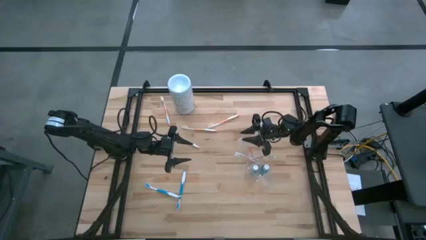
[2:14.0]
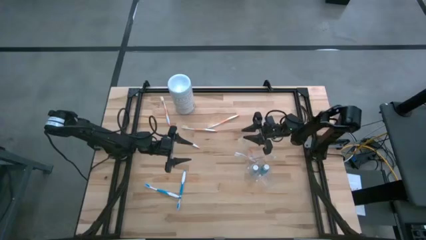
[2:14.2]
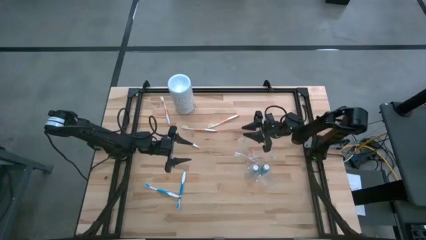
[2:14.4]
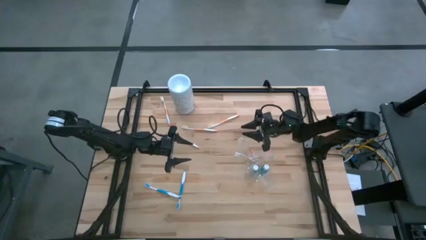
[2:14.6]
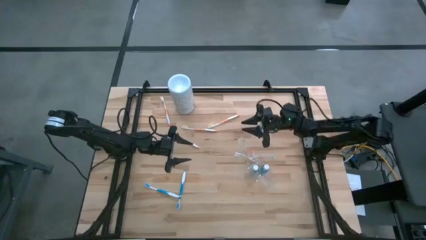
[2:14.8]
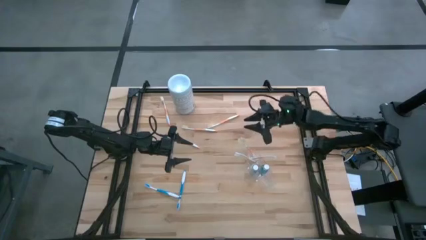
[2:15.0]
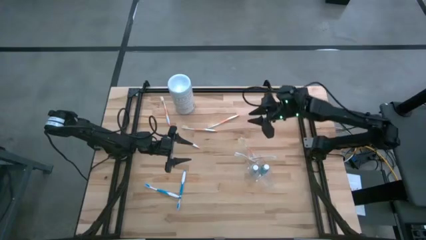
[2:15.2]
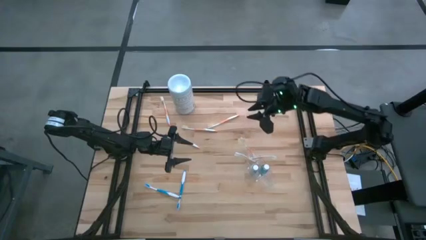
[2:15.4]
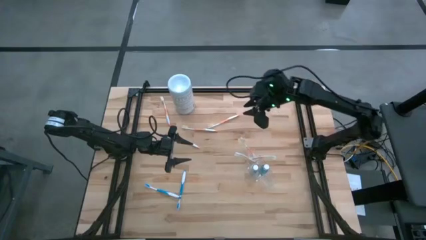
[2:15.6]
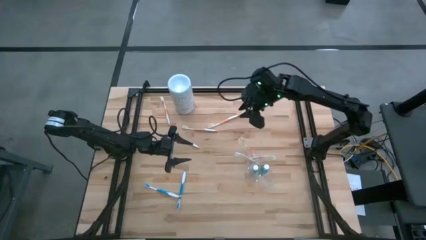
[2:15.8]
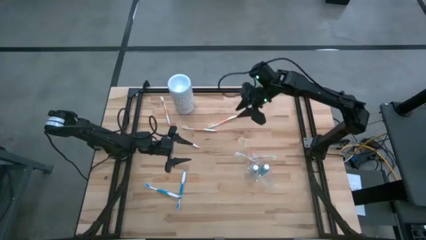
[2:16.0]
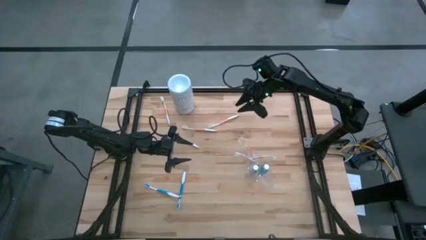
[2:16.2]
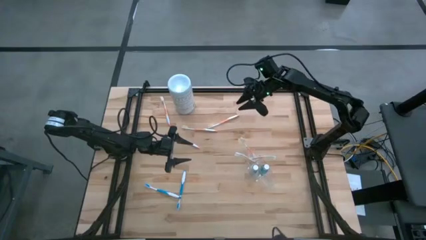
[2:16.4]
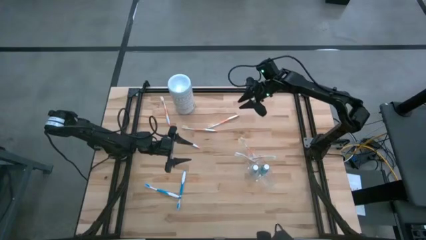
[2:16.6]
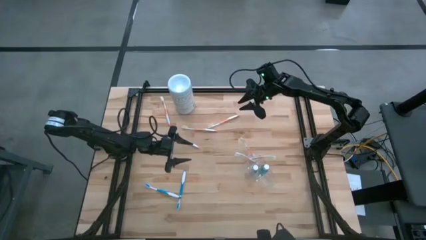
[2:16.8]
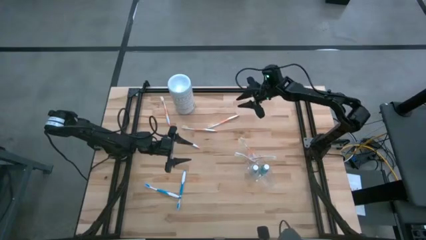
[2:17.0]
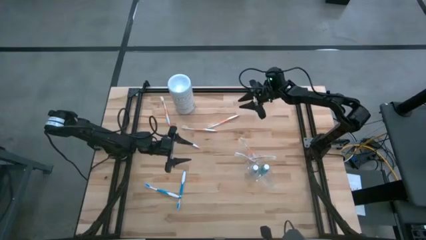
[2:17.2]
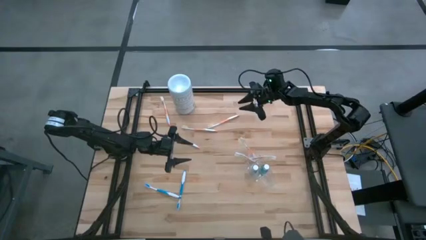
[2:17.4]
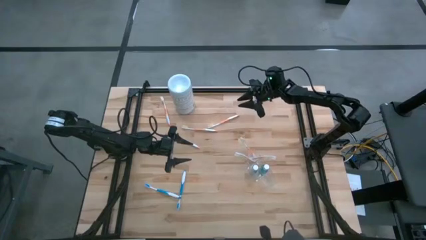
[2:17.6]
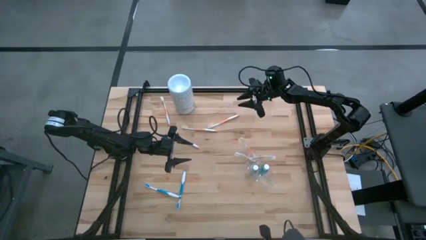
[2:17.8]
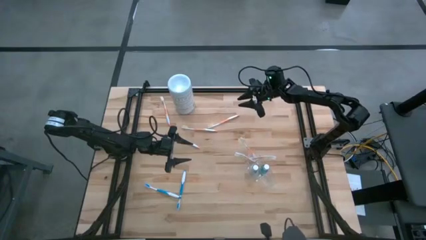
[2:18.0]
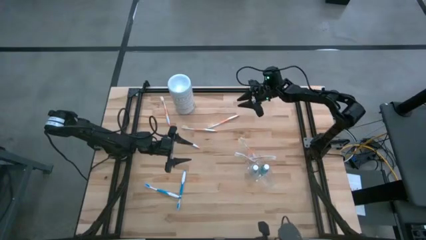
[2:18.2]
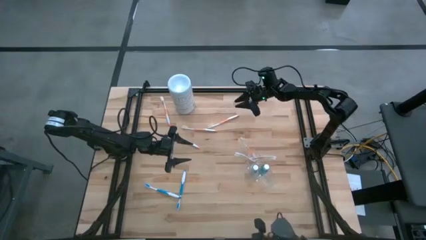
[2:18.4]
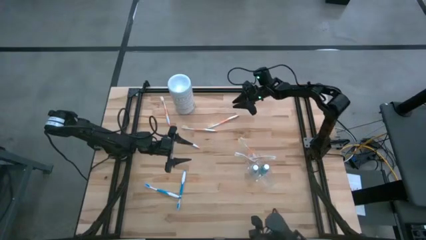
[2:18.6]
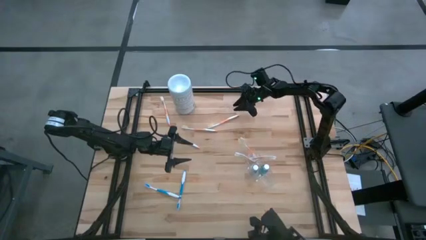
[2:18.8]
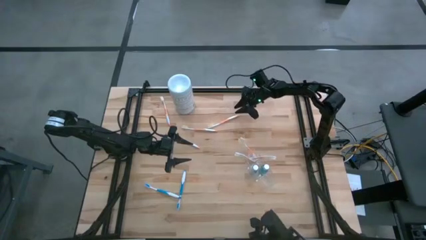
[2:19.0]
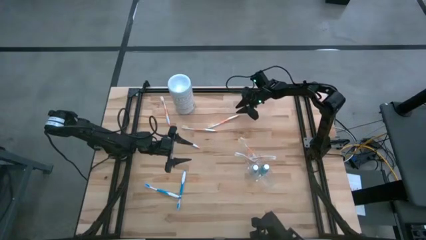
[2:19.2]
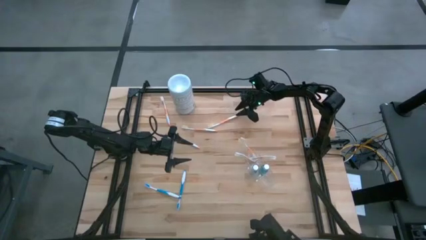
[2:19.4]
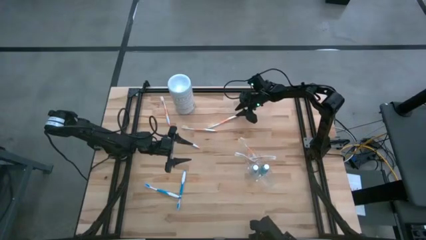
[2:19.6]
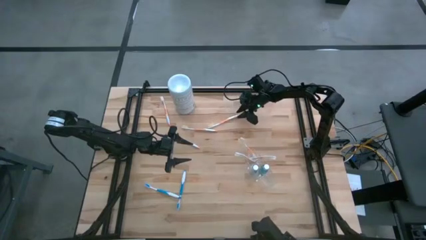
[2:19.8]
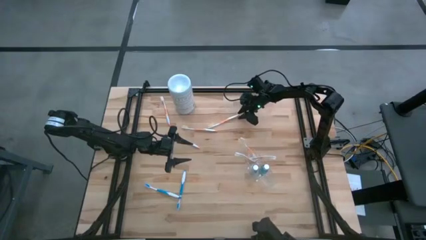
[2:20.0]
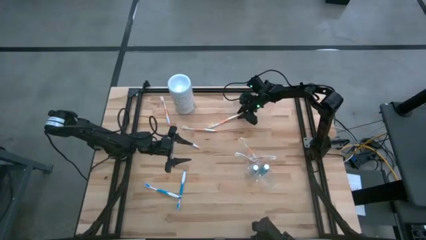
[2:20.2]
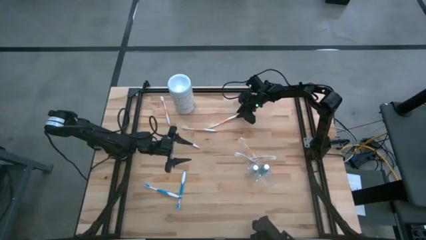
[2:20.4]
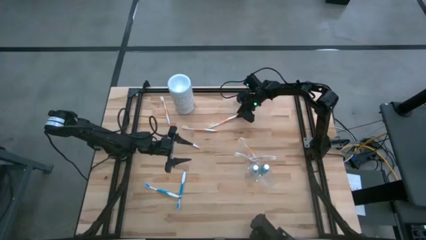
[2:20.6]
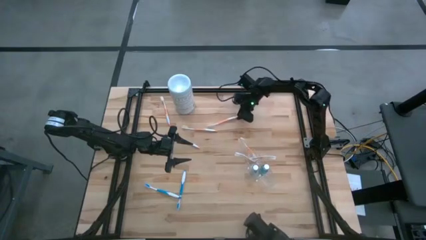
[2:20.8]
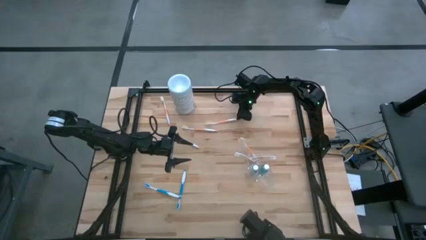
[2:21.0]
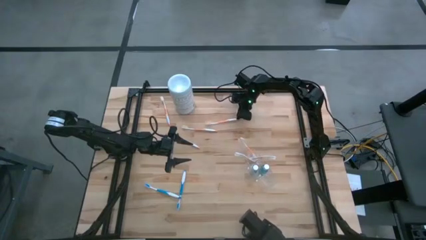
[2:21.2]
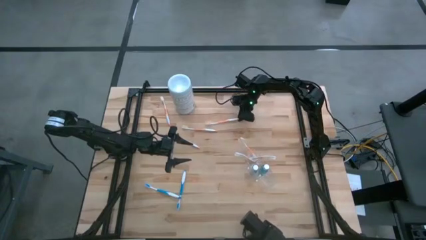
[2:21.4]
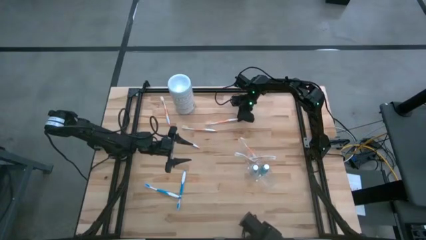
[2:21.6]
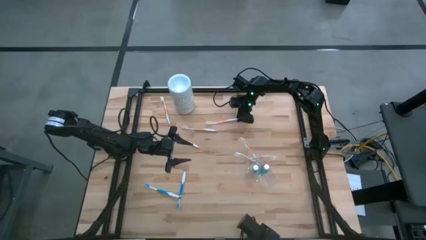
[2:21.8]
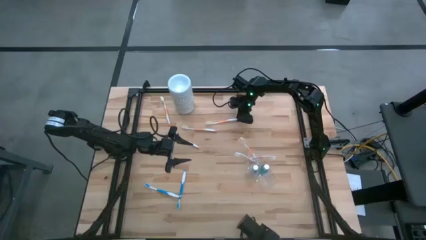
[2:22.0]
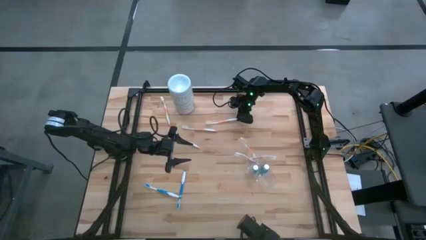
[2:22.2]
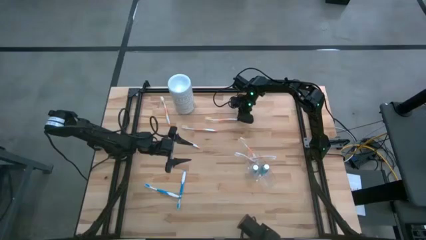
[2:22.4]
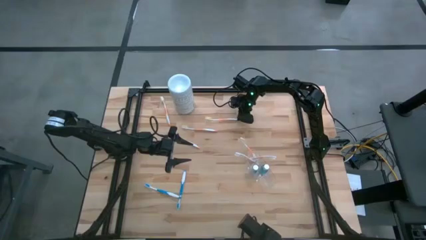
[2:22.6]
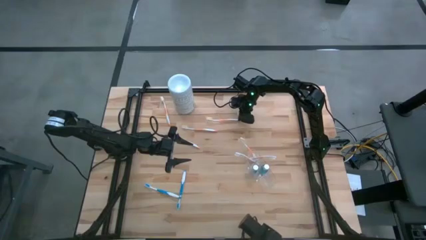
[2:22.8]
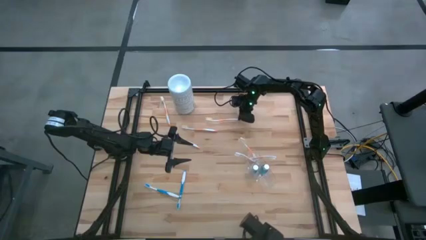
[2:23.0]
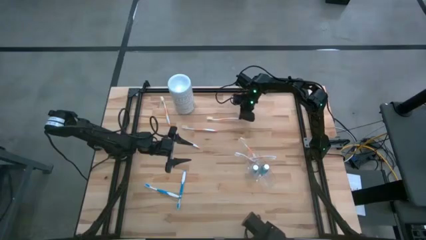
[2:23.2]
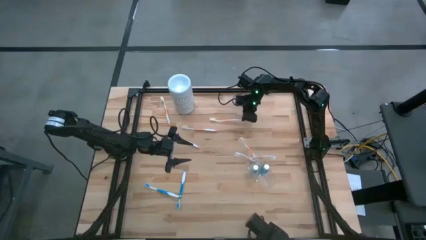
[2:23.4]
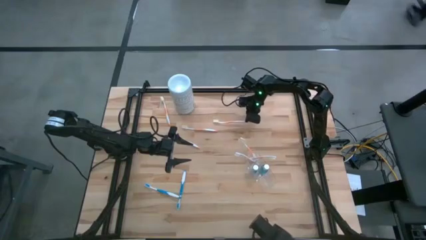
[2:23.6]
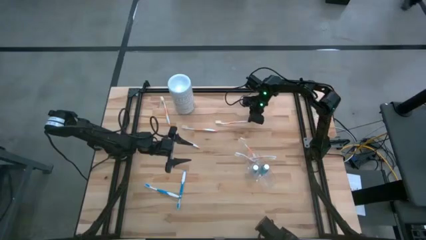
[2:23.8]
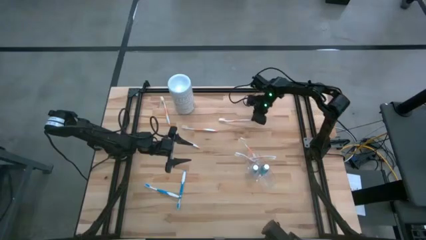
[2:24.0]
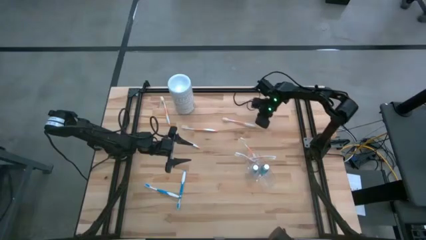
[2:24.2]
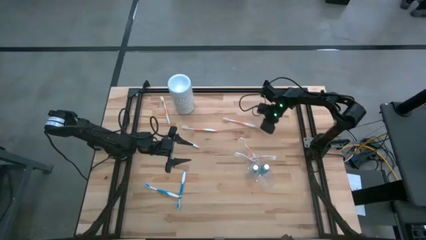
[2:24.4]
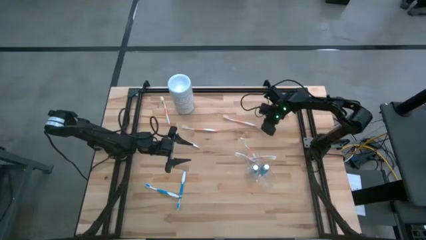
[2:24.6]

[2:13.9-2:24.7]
Task: Pick & Place toothbrushing station
Put the orange toothbrush into the top section of the transparent organizer

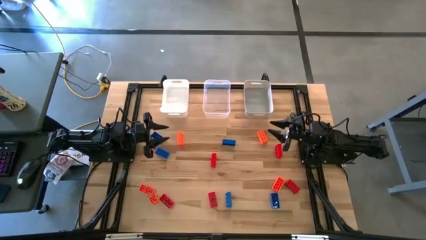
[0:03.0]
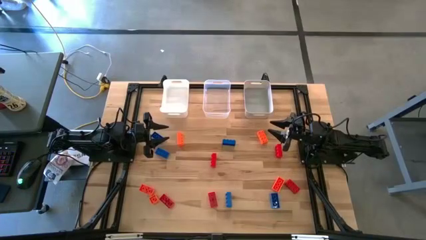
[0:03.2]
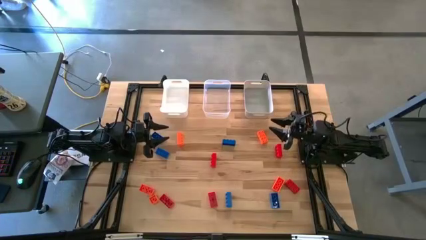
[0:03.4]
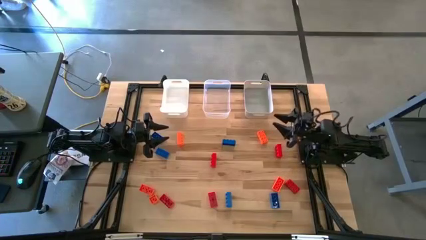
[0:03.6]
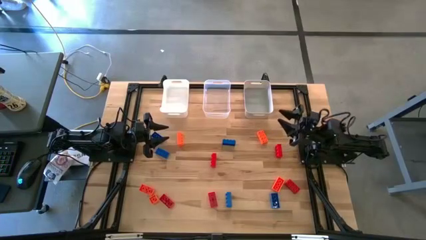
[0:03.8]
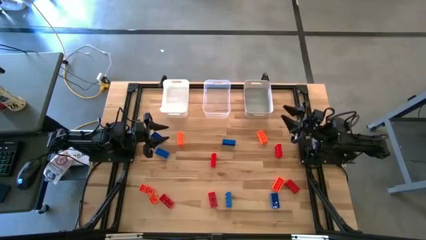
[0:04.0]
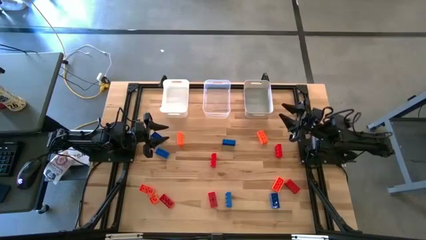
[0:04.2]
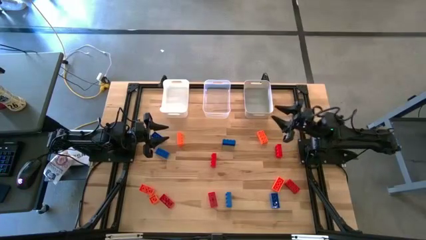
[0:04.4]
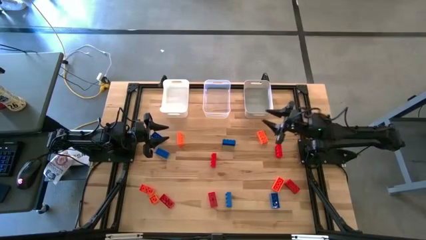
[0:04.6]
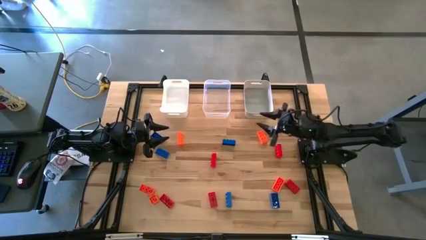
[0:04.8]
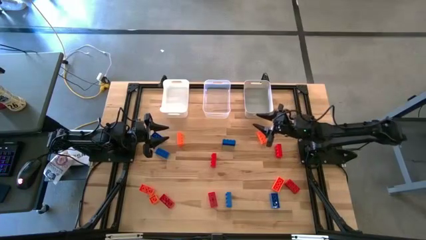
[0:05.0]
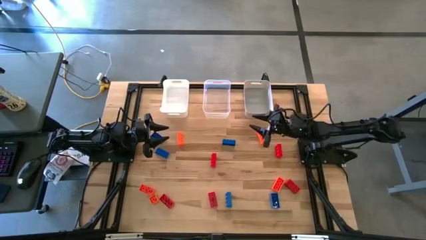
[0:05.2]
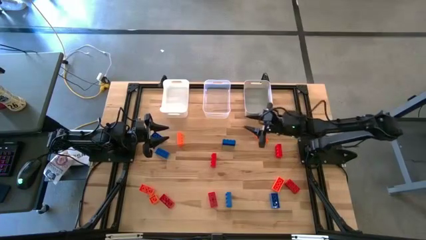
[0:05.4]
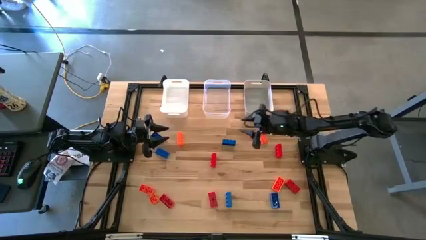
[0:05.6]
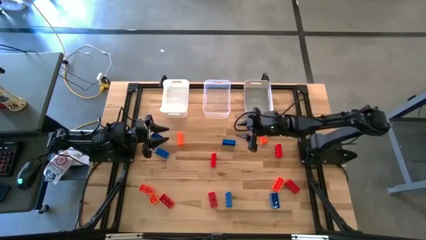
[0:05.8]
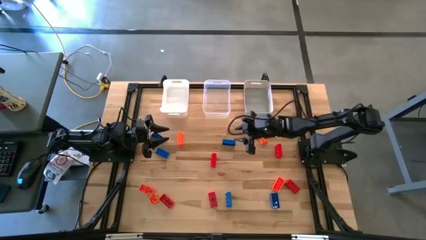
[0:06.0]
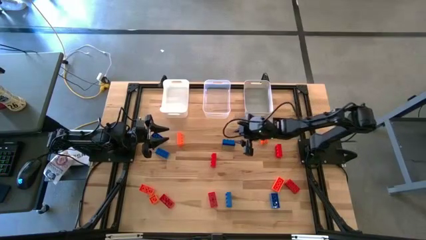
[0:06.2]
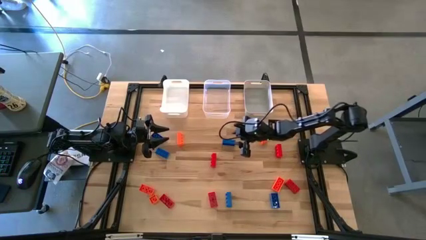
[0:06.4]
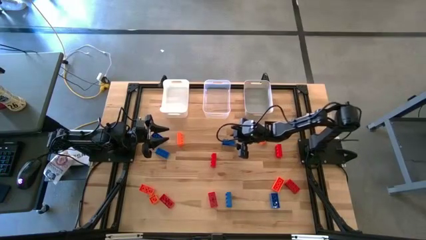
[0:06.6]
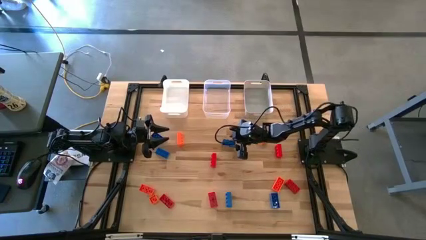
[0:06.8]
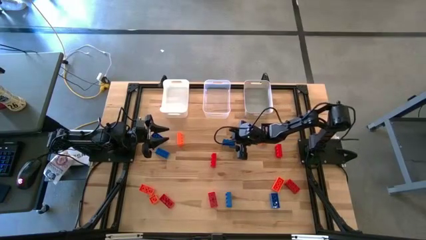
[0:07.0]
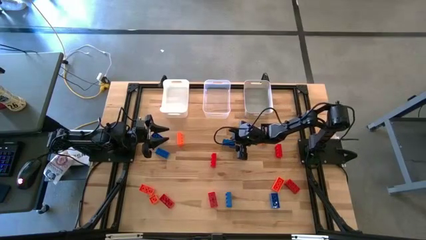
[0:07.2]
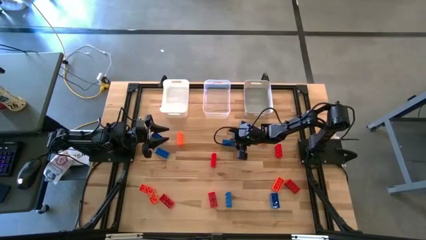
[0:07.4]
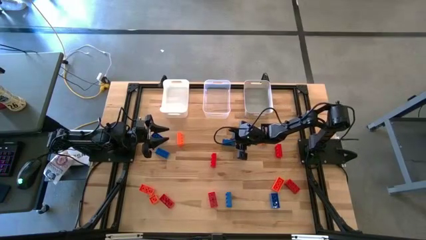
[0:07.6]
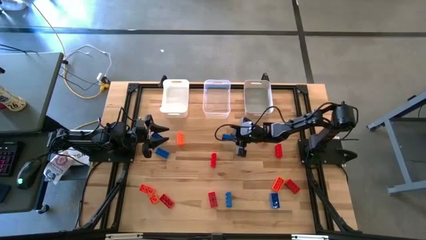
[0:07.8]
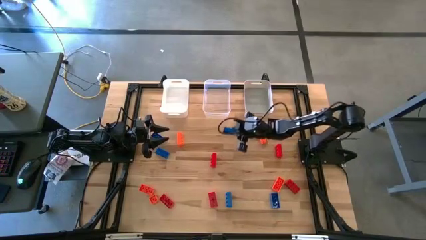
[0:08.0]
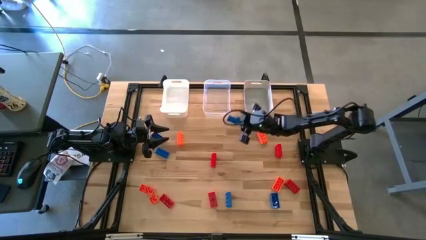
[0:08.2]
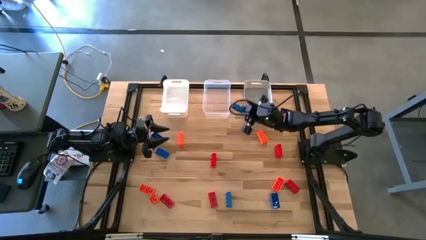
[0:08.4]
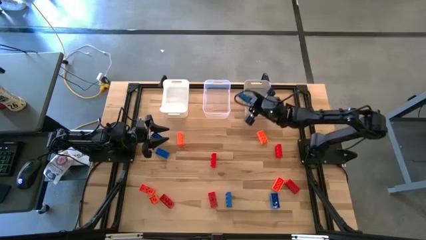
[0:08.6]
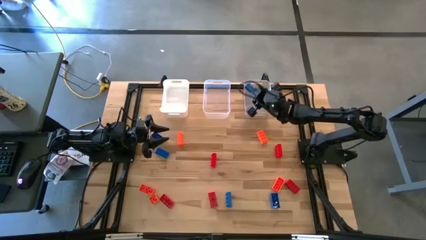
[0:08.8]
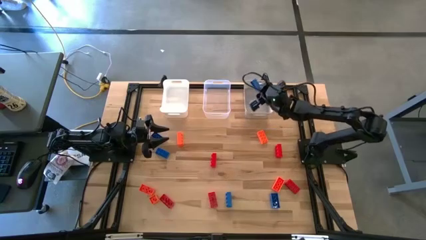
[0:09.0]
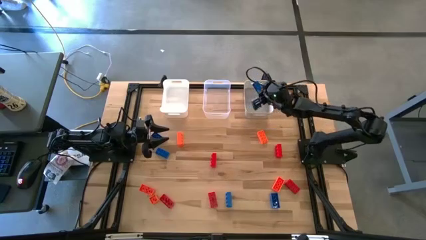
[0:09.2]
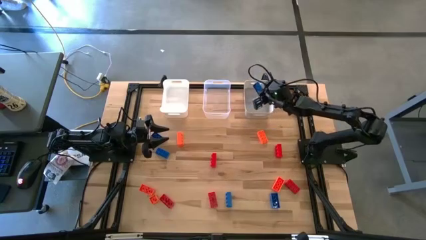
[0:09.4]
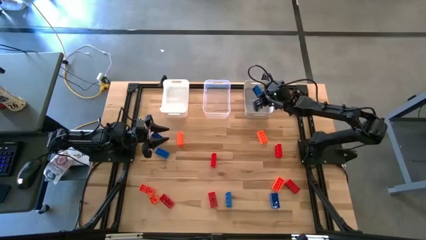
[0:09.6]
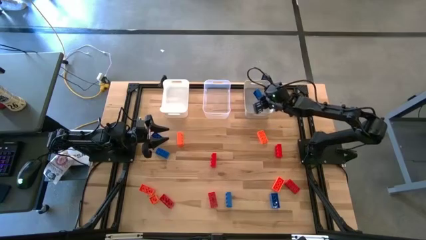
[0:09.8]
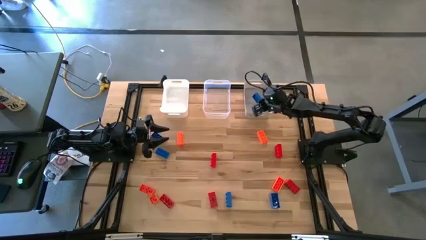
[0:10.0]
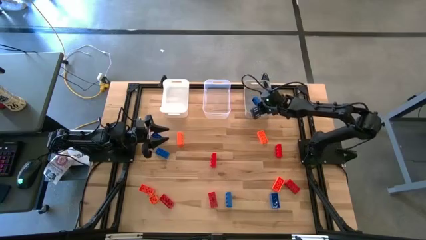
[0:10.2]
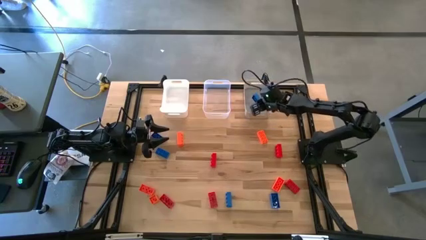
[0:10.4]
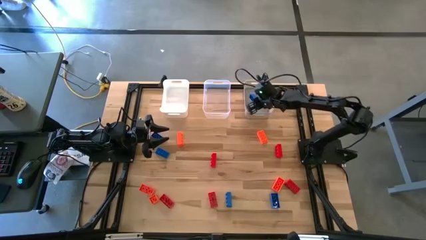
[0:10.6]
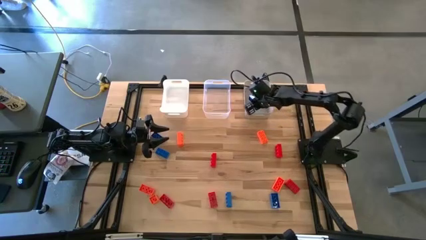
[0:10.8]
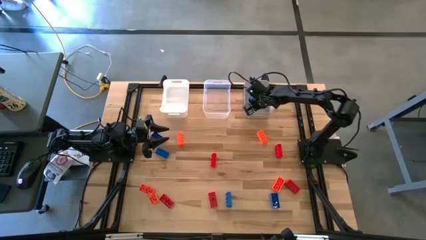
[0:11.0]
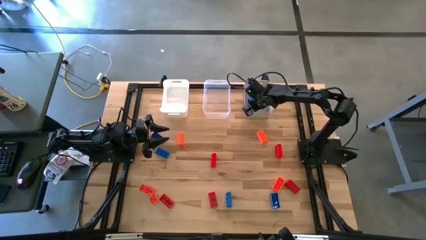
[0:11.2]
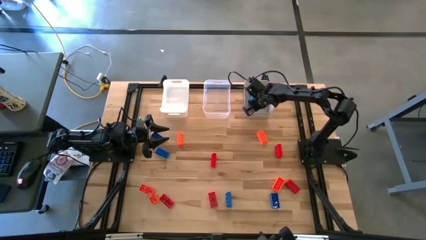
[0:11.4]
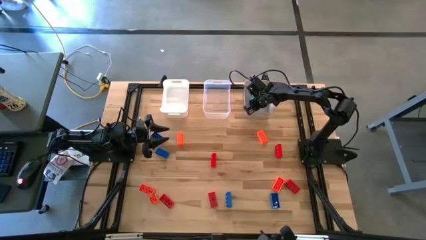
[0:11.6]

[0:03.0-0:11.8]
Task: Sort & place blocks by color
Put the blue game piece into the gray bin
